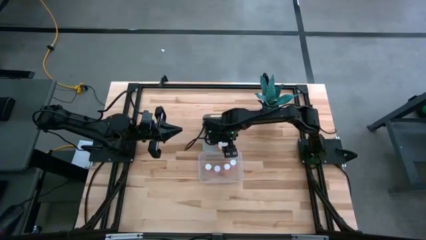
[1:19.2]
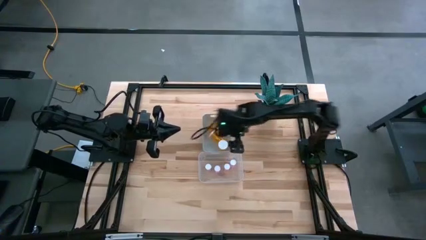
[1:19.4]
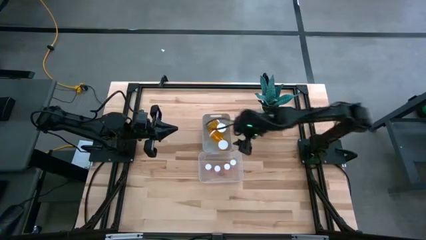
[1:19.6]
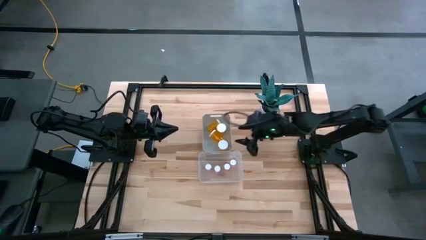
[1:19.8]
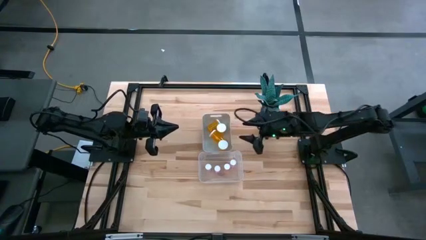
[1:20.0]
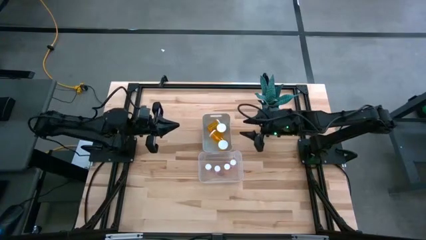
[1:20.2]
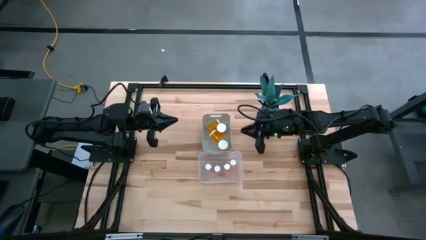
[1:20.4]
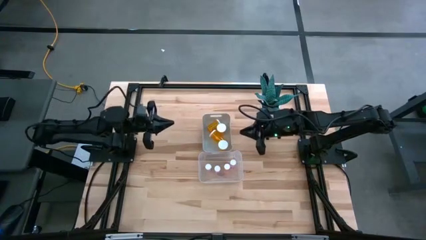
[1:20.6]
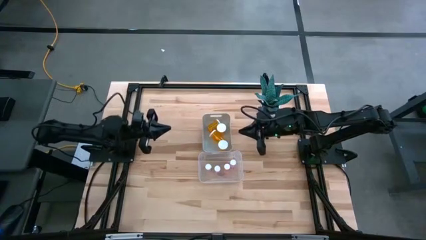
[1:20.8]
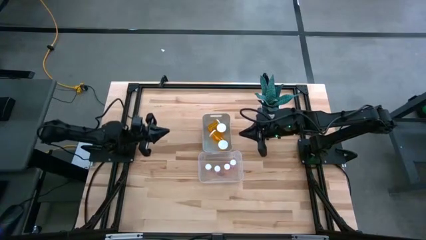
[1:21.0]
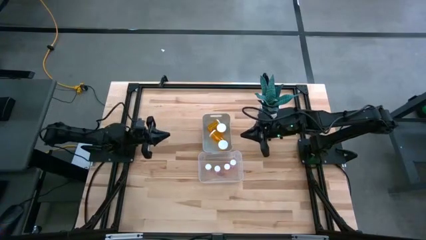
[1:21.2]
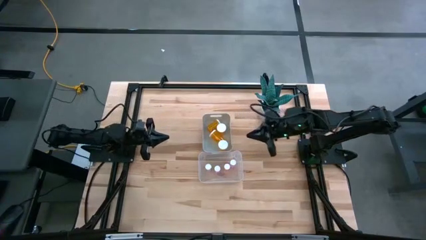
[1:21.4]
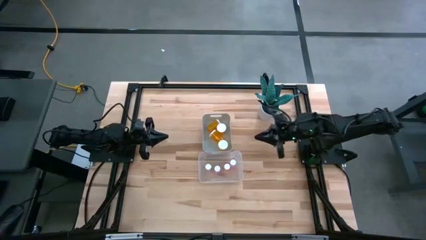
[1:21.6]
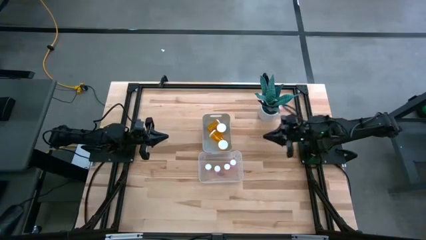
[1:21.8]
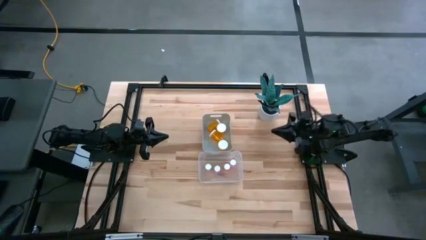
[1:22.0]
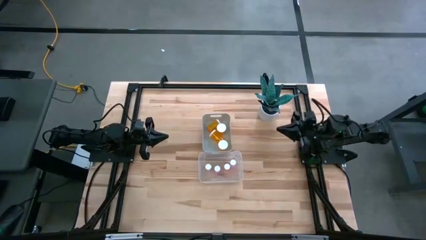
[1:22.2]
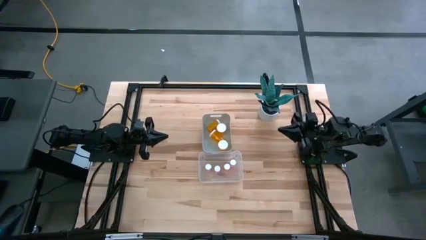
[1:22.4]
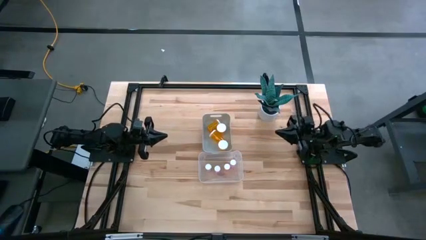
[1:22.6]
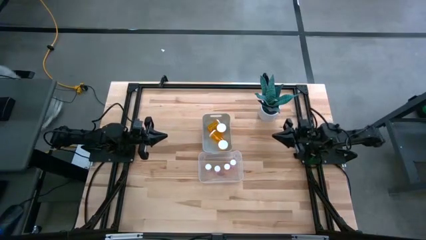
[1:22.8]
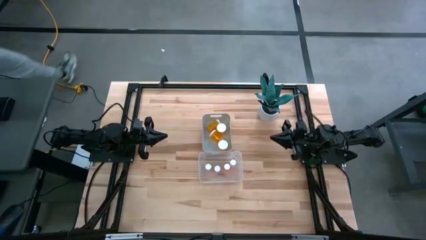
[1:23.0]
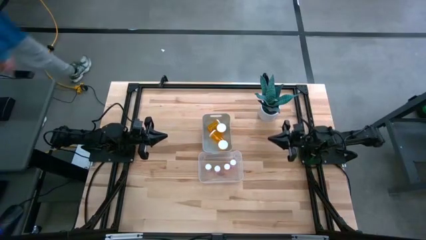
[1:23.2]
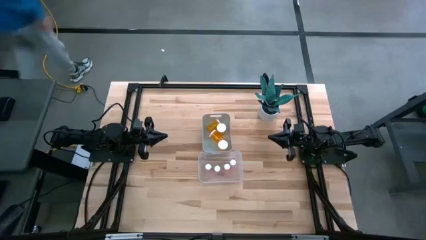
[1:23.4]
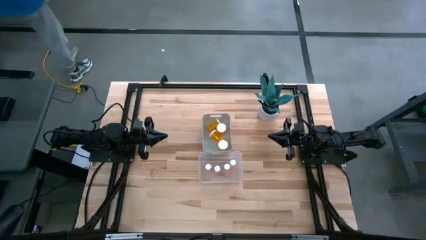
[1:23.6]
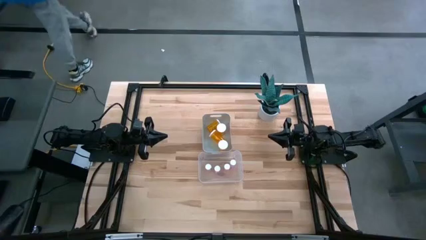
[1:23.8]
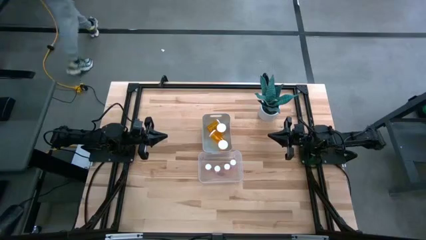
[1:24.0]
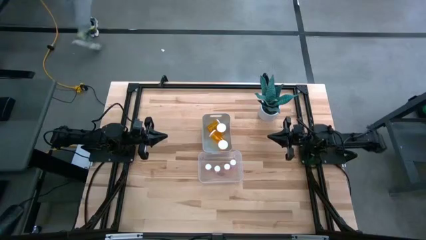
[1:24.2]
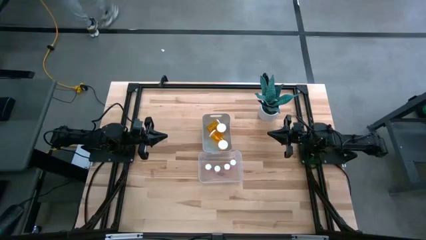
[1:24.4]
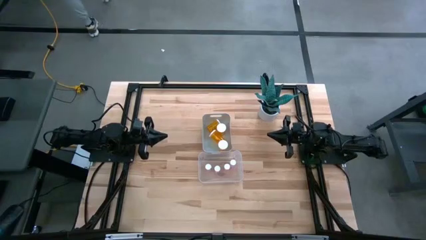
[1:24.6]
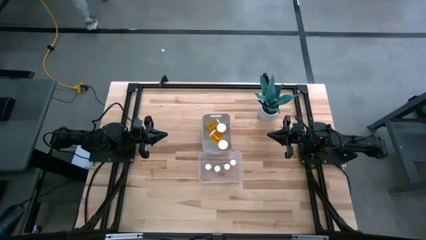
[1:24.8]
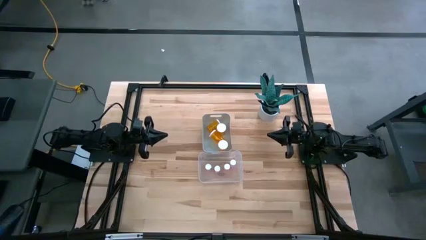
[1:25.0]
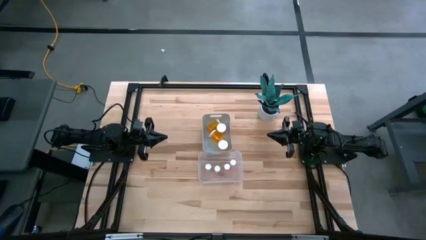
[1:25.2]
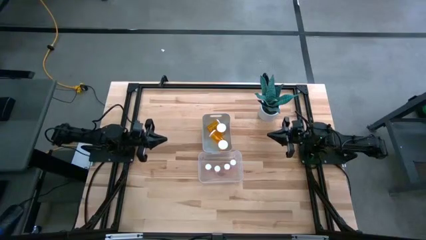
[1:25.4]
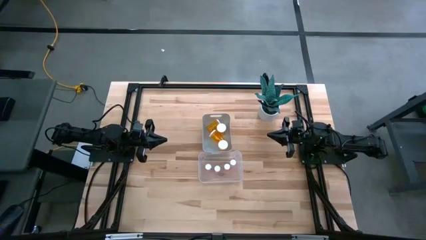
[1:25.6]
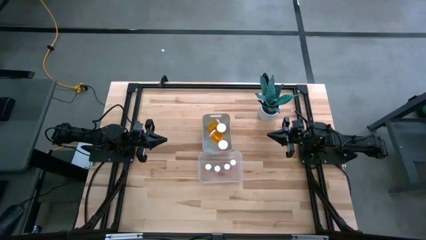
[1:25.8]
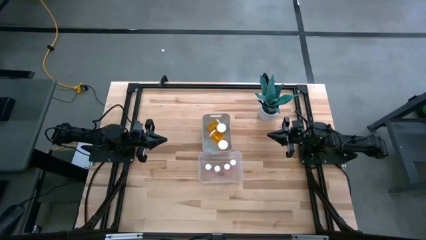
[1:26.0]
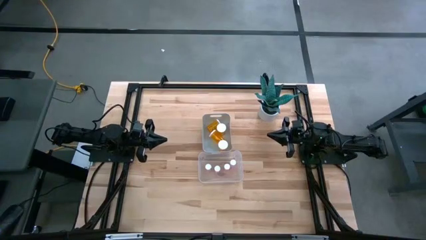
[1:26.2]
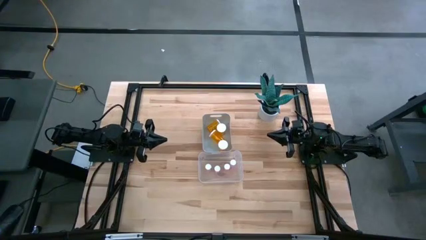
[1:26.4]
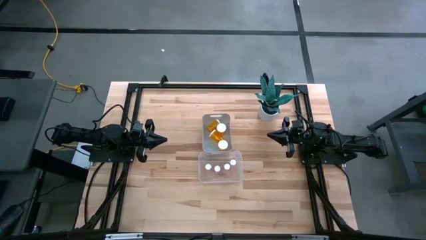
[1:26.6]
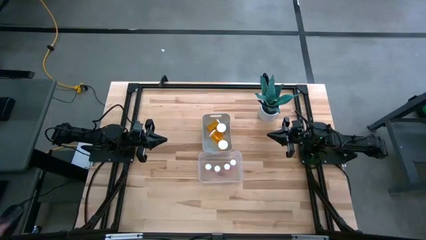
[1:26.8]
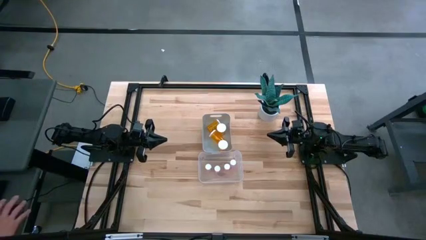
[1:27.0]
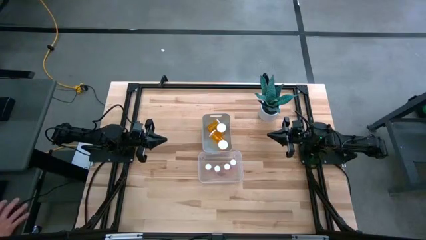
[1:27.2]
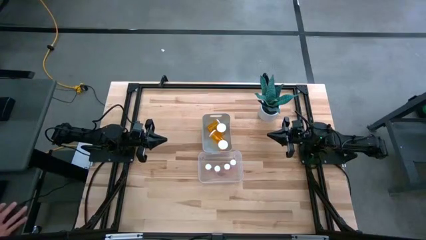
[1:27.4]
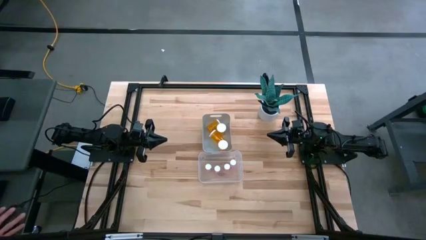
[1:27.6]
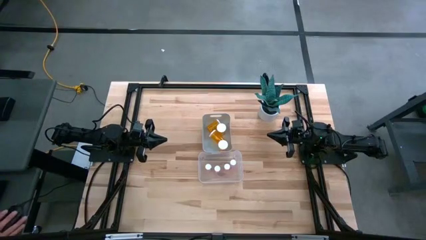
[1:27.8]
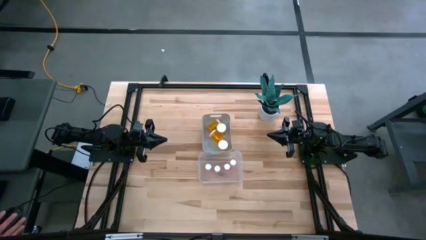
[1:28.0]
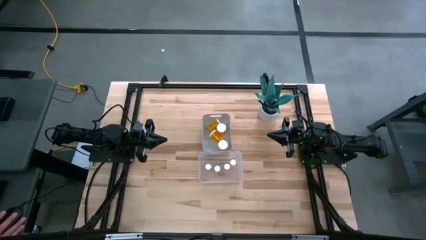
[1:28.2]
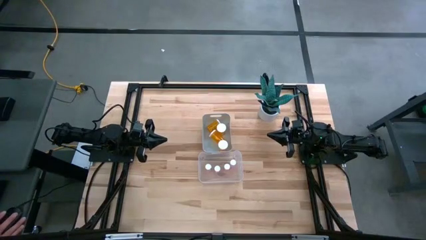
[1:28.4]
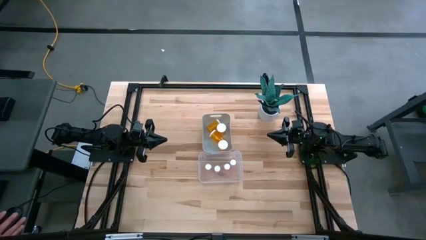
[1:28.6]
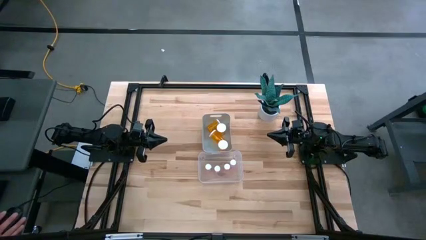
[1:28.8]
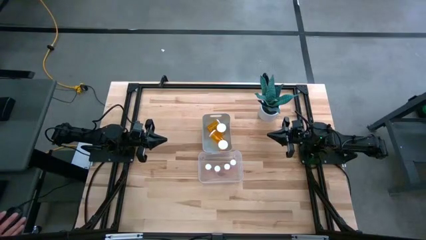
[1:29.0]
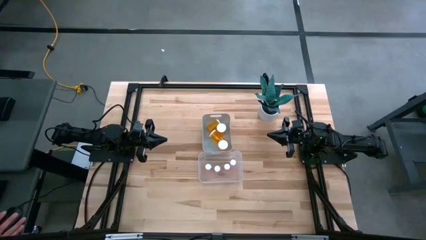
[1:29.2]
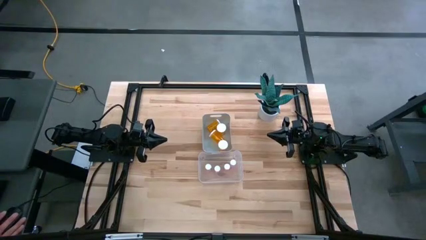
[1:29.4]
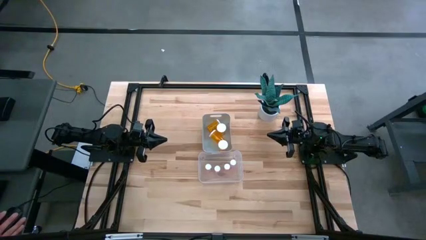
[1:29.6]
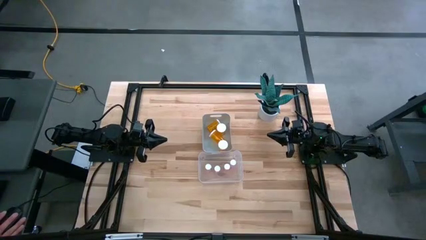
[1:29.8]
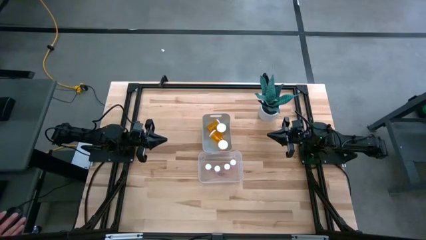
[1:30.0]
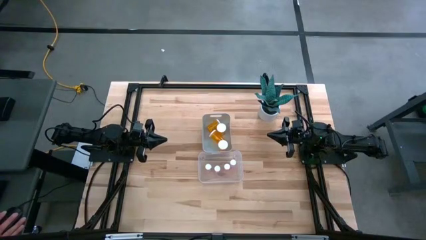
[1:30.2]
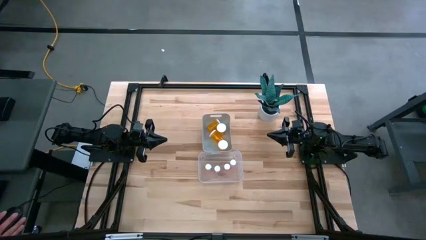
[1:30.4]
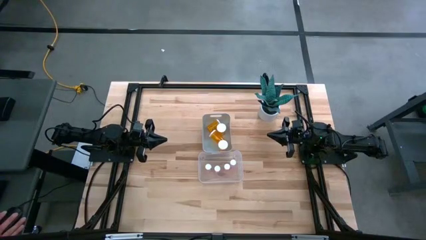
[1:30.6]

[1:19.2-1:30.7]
Task: Pick and place medicine bottles into bin by pill shape (circle, oval)
Return to Home Position

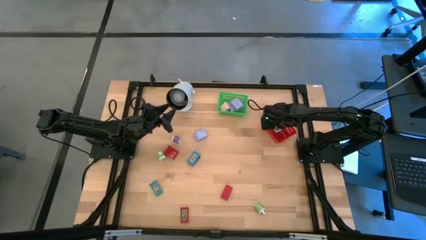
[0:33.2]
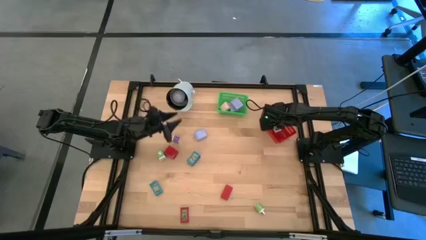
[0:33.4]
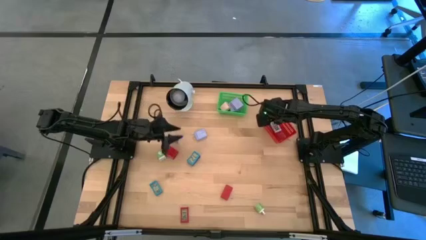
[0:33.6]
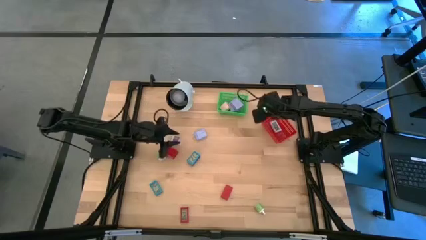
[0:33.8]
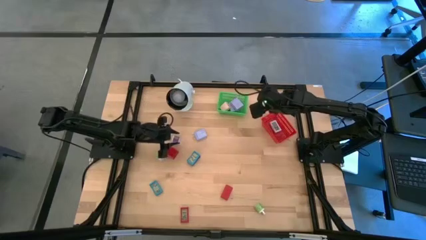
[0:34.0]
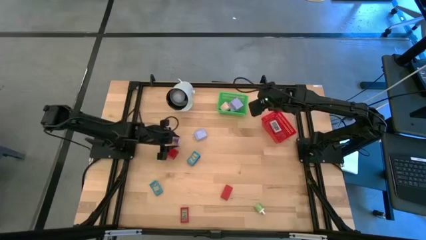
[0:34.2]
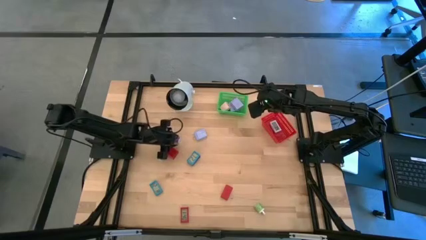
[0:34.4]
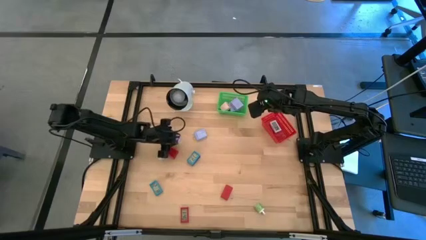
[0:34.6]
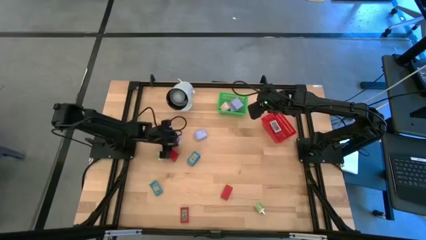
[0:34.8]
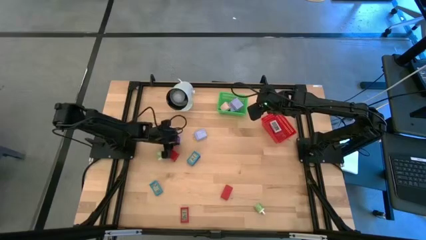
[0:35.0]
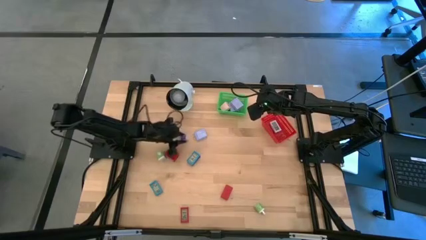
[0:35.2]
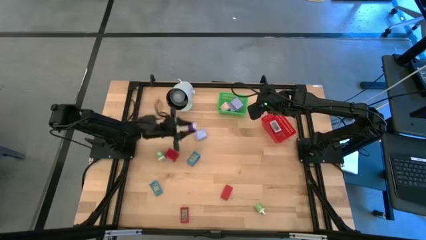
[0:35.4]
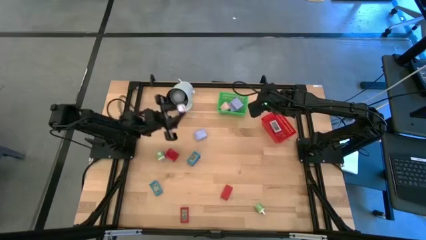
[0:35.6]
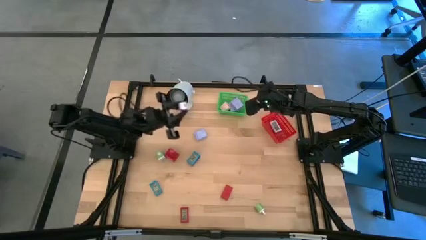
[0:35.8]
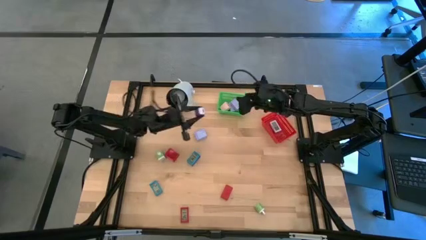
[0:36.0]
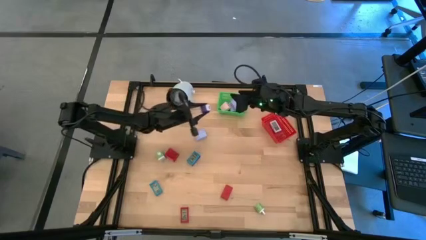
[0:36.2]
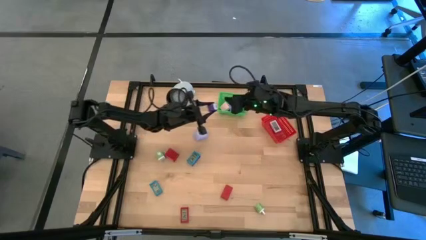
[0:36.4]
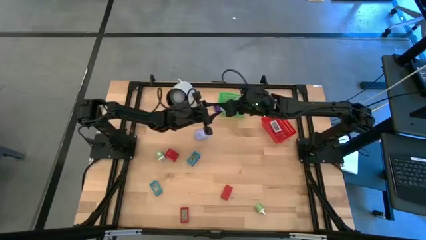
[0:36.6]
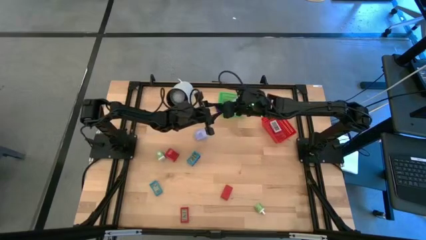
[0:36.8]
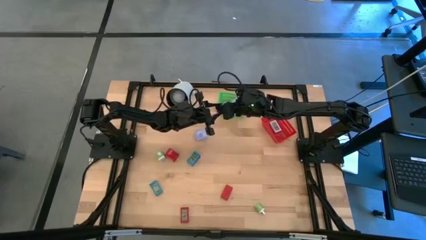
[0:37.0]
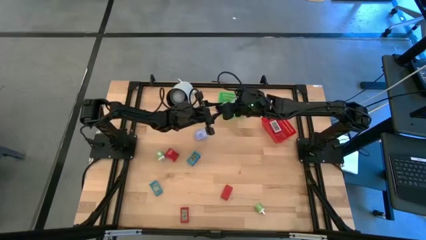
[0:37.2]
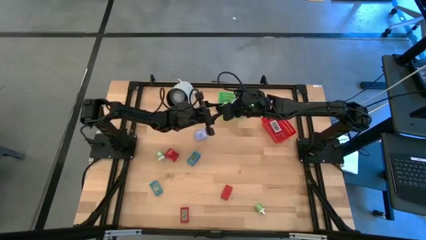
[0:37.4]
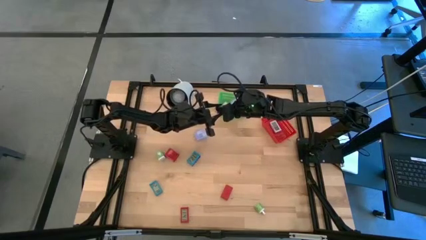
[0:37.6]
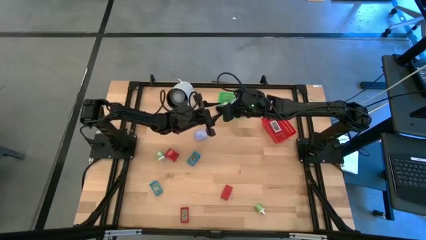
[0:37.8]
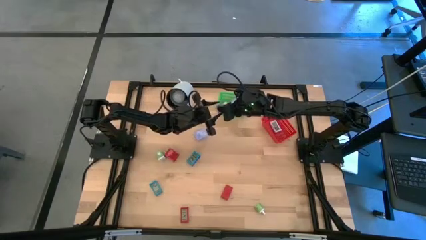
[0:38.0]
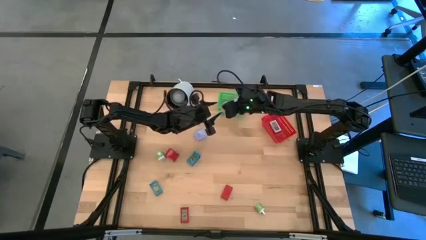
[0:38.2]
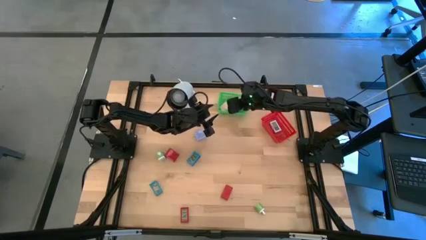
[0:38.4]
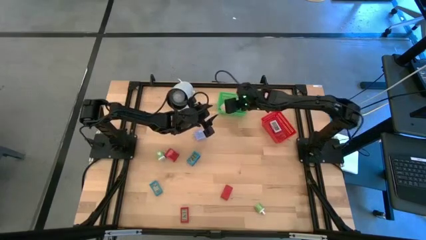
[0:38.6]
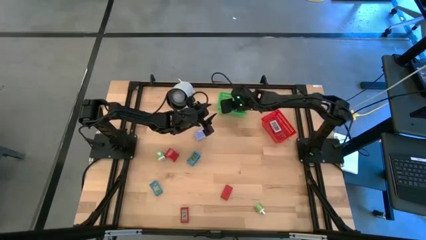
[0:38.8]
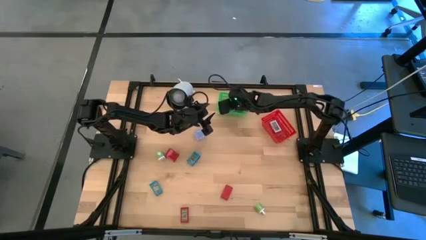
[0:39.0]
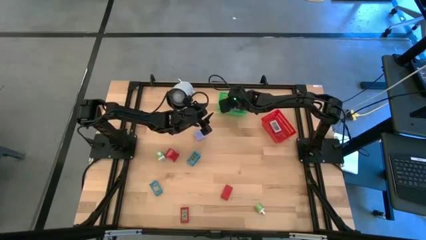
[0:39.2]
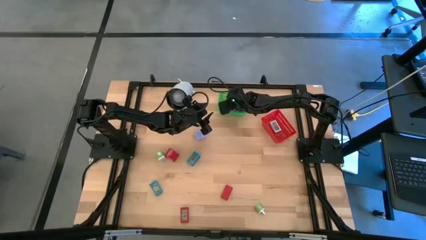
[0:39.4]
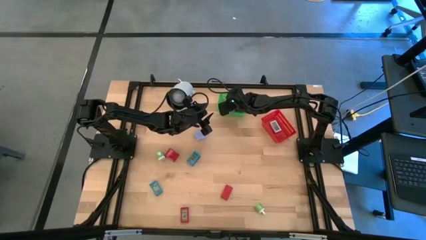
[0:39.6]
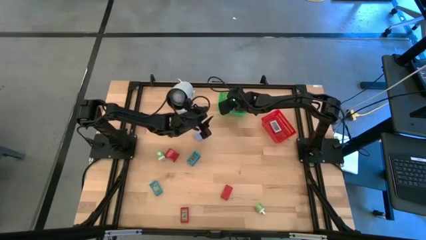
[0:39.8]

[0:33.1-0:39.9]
Task: Pick & Place Office items
Put the purple charger adapter into the green bin
